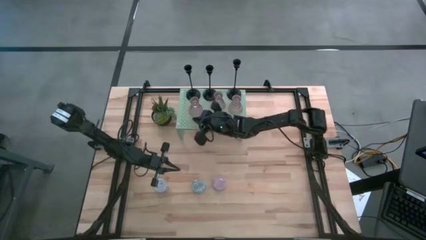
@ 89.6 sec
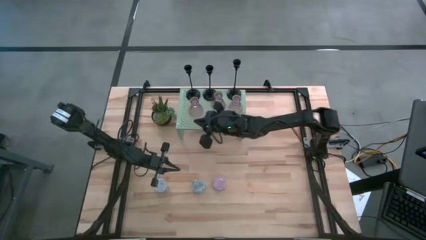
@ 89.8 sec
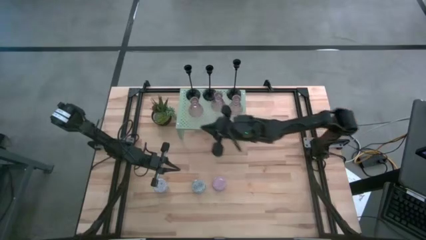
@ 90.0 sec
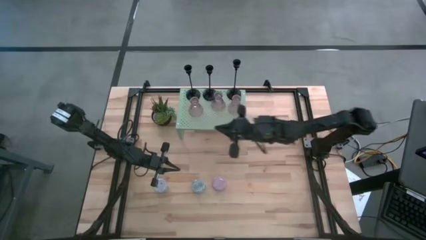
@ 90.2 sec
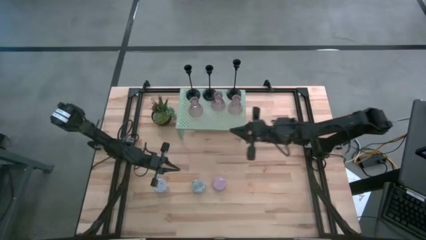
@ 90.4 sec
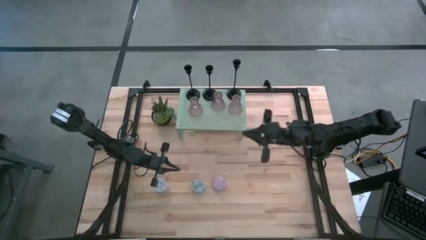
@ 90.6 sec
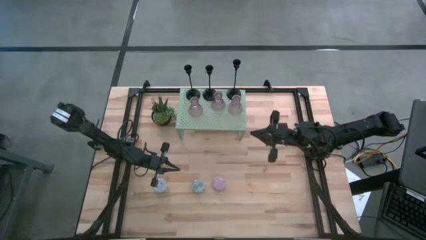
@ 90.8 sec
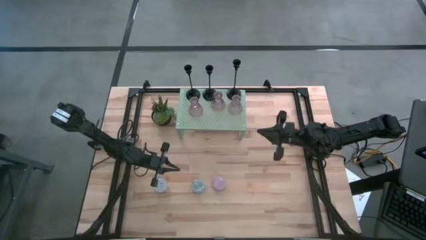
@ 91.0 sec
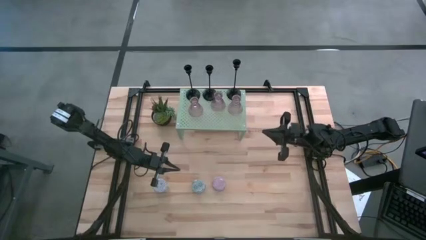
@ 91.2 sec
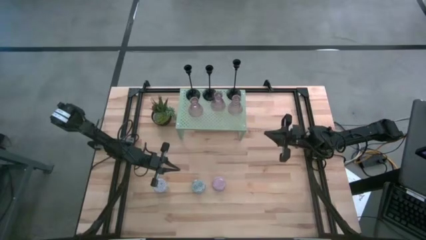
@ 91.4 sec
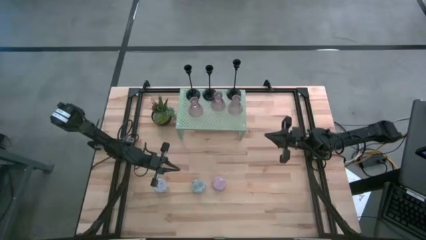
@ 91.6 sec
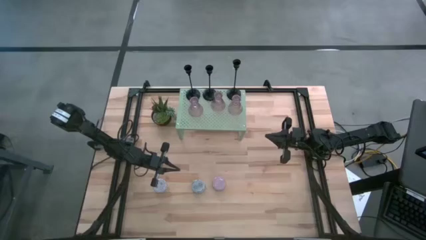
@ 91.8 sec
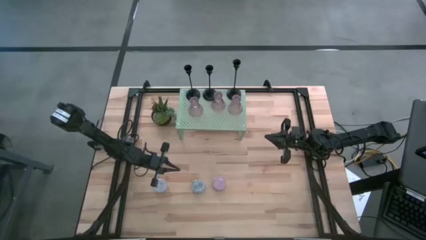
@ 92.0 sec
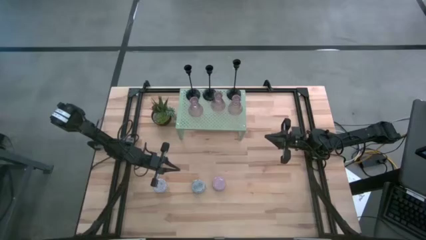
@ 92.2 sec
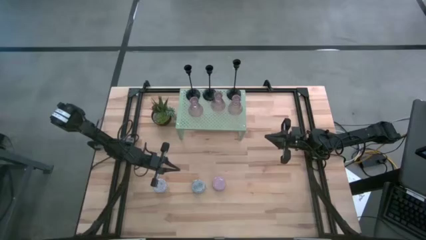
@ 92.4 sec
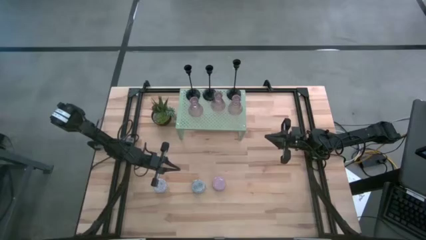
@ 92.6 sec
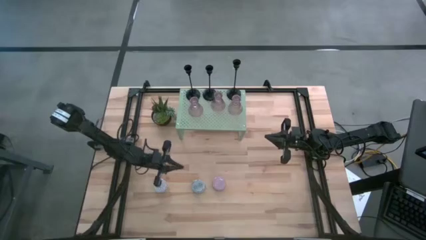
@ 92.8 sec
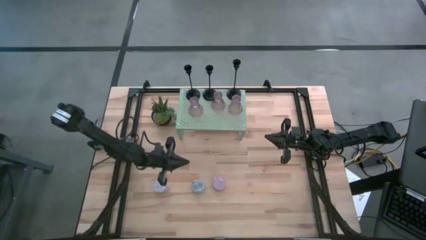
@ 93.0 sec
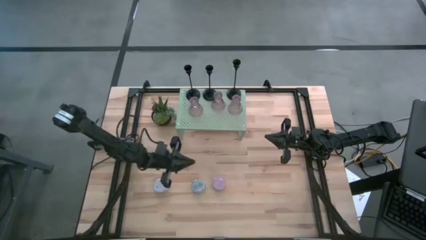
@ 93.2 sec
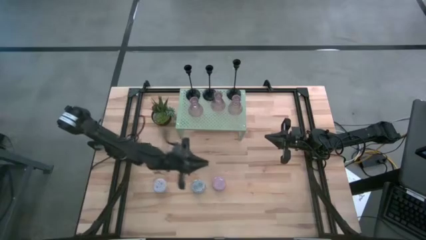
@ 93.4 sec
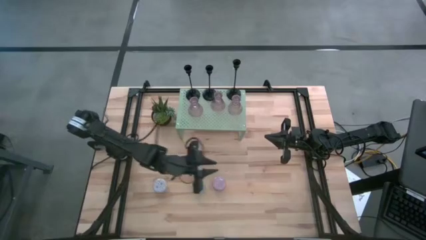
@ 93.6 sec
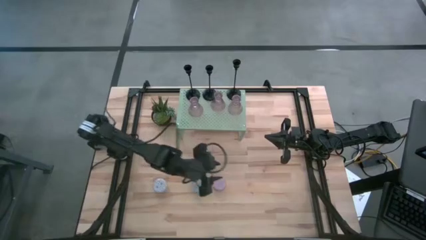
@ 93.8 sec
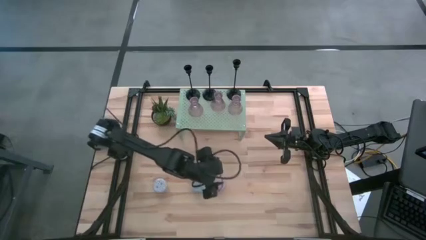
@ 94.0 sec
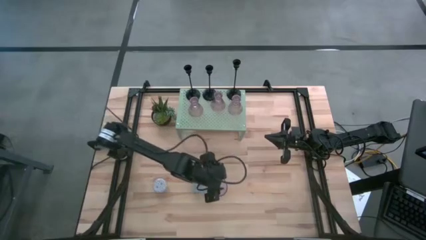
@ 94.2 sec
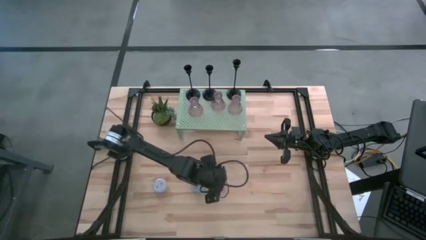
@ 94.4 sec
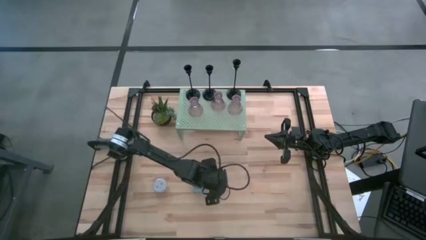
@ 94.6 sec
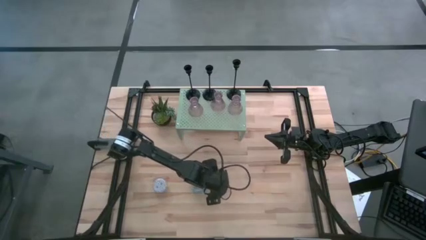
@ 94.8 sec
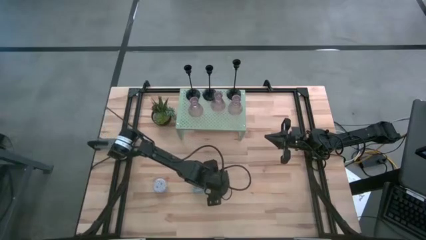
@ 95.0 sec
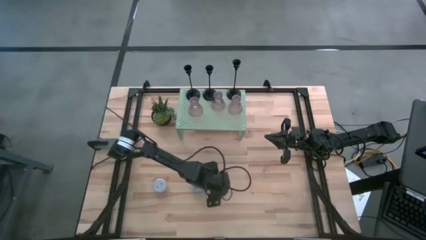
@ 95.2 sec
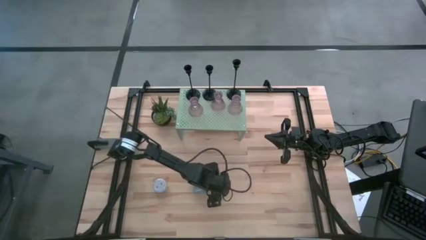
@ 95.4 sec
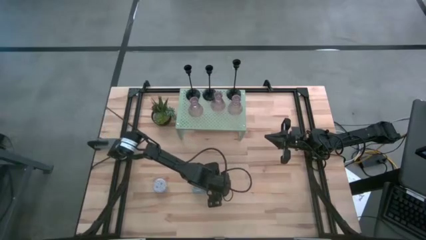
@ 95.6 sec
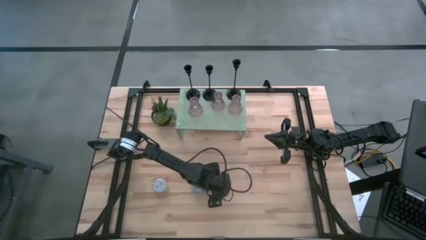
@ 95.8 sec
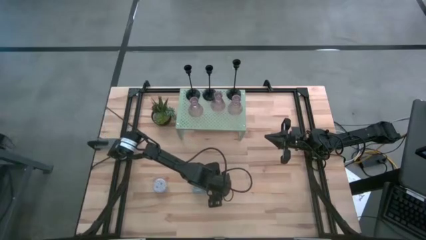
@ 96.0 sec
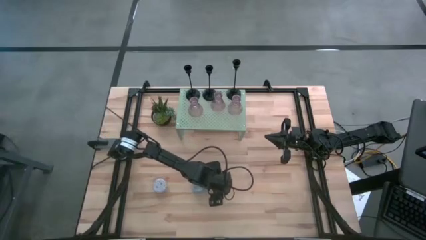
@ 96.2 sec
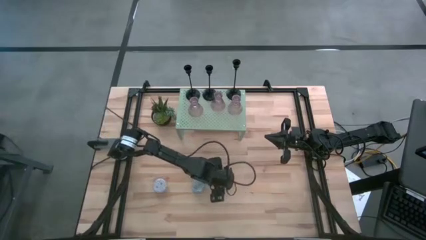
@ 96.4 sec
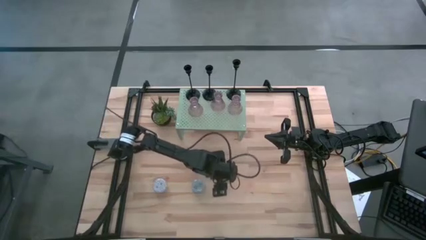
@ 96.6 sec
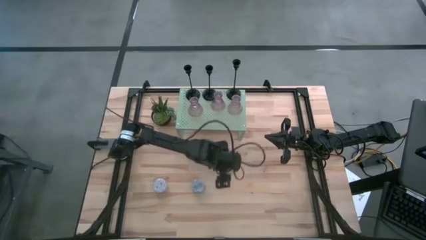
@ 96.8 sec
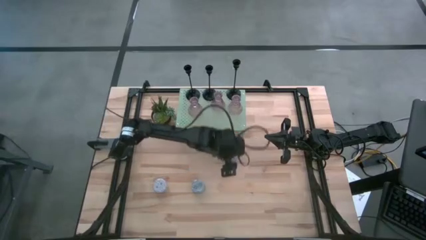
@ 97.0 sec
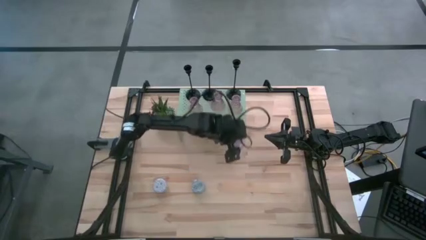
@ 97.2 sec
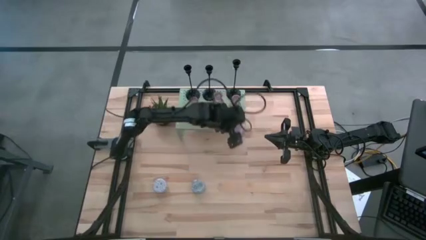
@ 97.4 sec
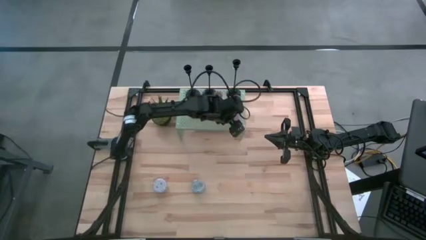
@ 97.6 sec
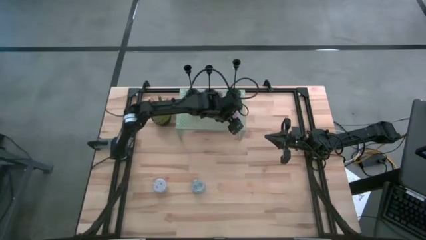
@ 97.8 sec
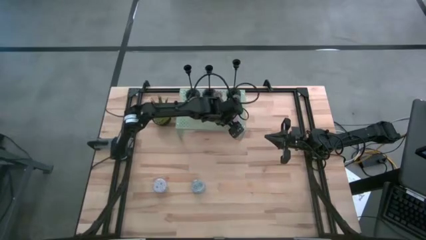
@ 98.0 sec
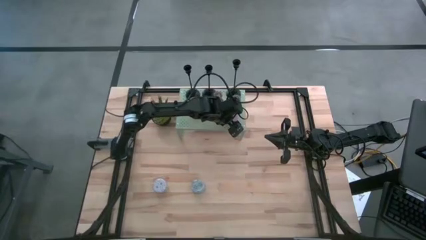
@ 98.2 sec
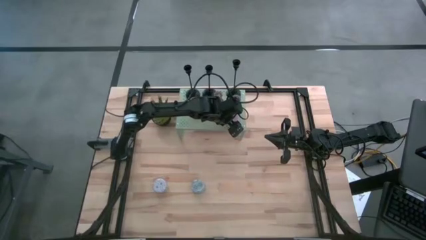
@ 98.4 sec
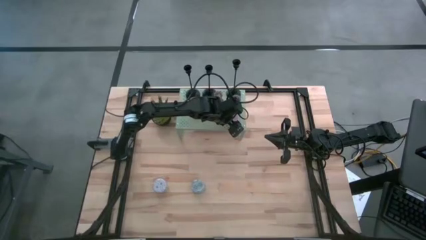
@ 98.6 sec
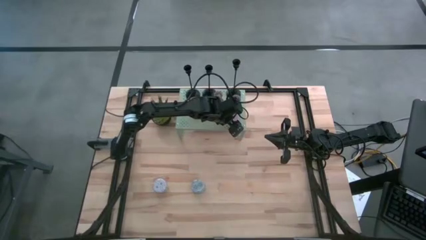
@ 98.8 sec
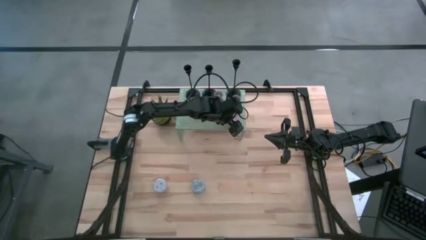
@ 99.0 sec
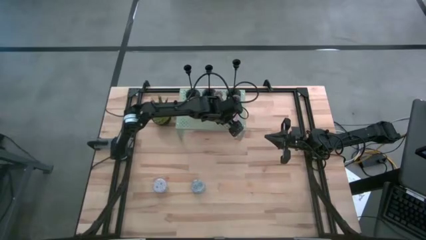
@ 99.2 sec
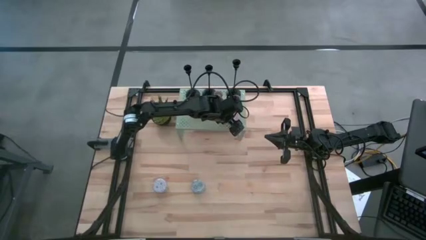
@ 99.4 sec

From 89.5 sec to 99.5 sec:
Task: Pick & Place candle stick holders
Put the purple scented candle on the shelf aligned with the transparent pink candle holder

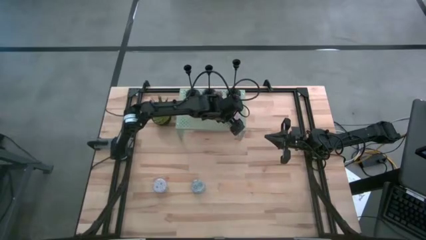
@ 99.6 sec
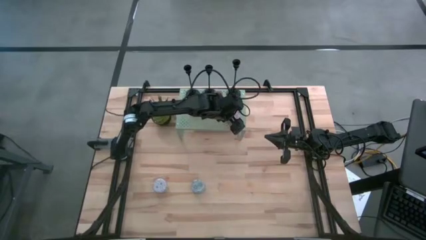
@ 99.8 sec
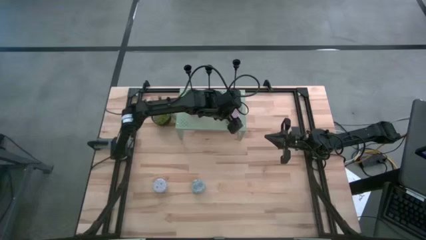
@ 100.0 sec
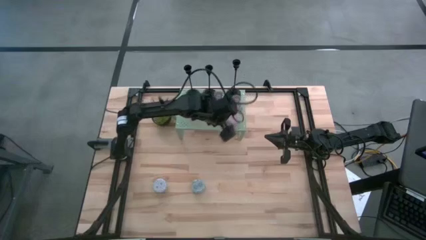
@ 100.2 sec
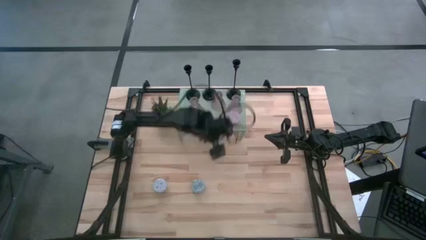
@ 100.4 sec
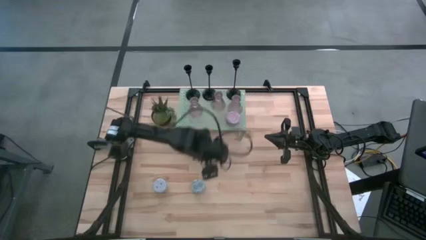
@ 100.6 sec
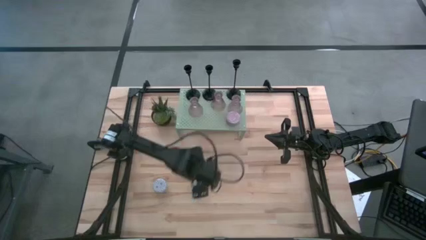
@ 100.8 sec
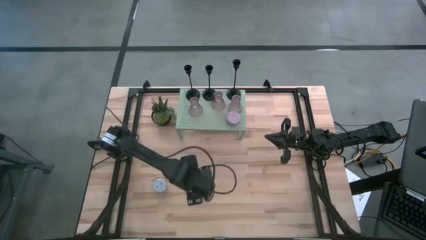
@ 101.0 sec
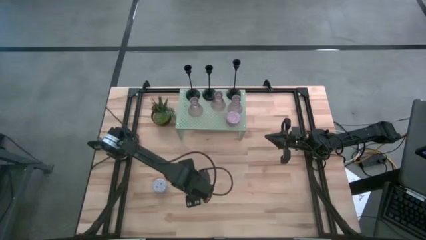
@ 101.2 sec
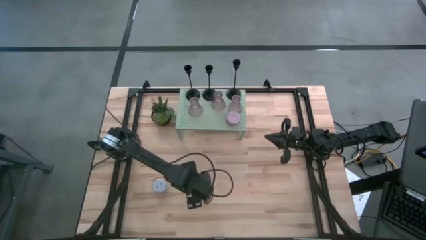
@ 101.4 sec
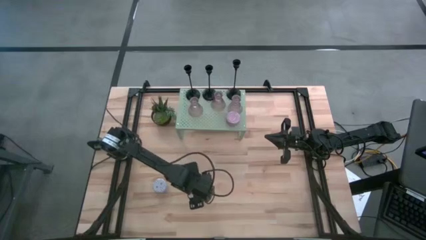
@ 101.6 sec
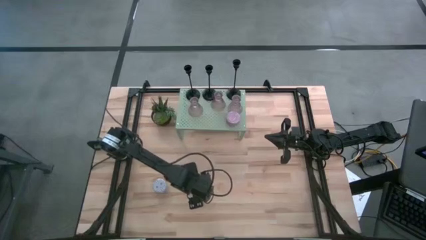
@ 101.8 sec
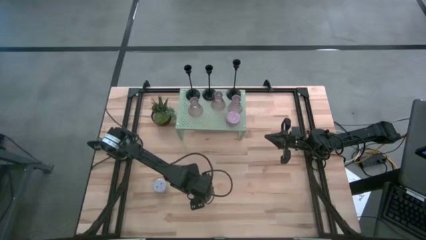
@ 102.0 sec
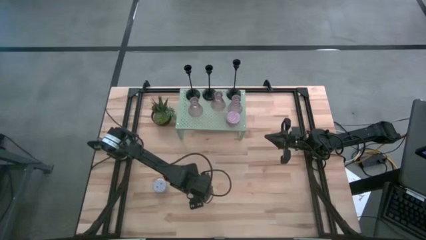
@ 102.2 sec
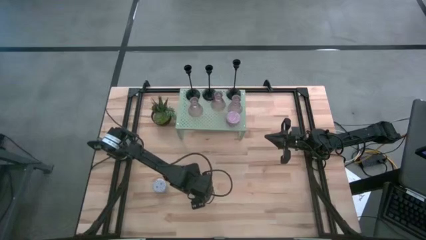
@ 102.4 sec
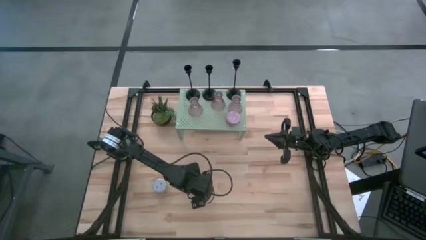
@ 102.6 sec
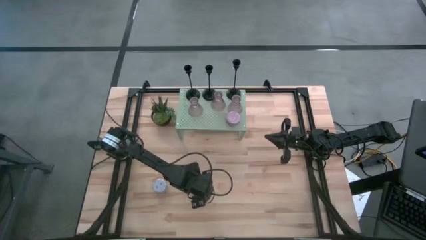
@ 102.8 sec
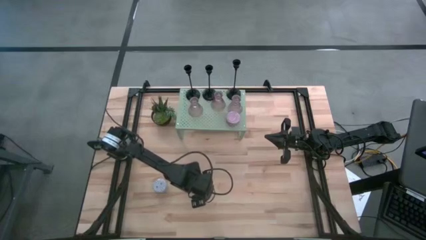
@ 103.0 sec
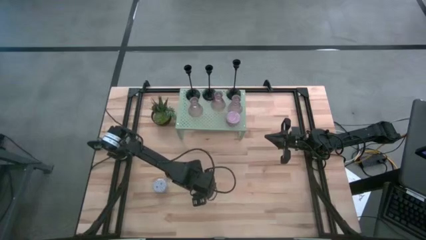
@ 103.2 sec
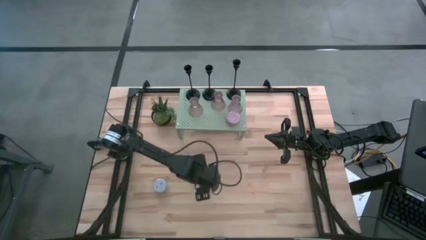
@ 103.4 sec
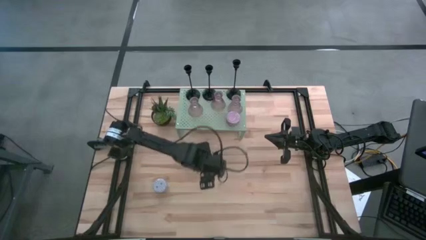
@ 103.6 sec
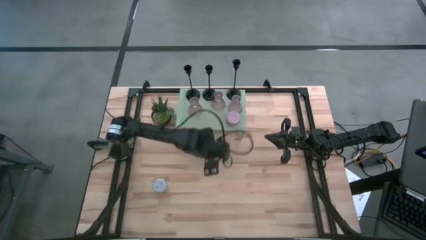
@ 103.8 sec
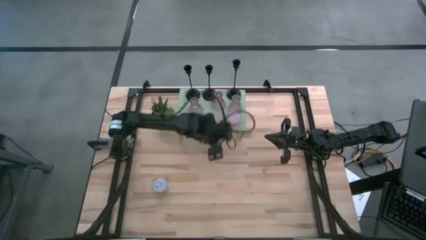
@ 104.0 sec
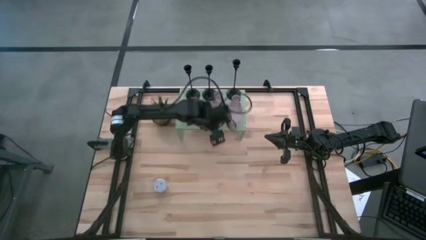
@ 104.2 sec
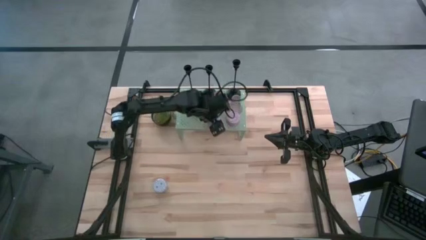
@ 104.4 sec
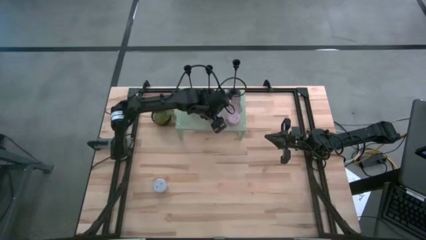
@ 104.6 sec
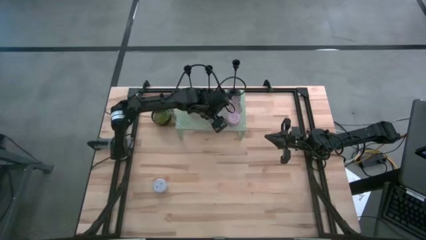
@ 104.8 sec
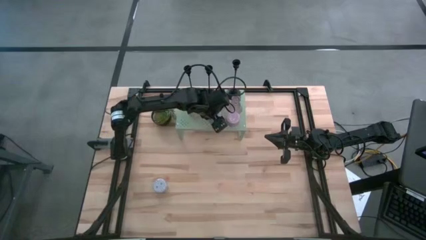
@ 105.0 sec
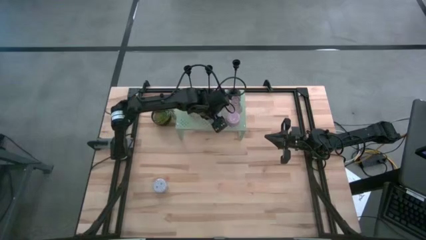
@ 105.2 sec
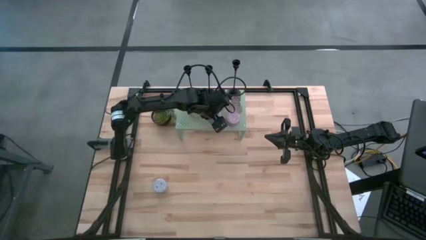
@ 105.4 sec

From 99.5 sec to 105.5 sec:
Put the blue scented candle on the shelf
